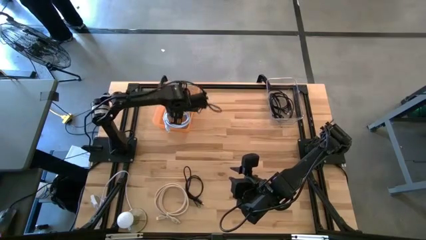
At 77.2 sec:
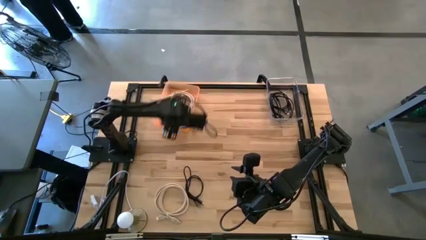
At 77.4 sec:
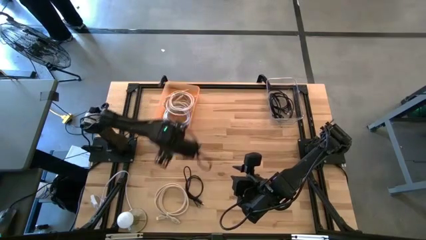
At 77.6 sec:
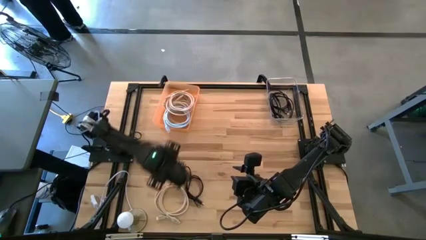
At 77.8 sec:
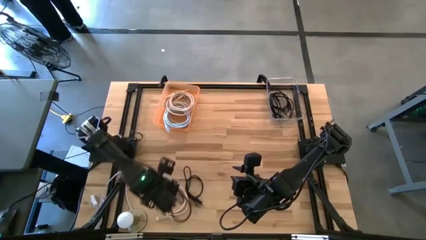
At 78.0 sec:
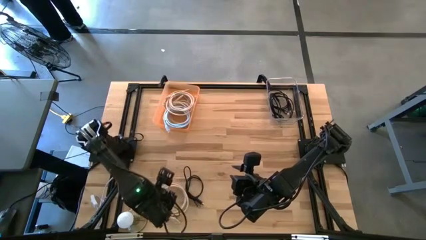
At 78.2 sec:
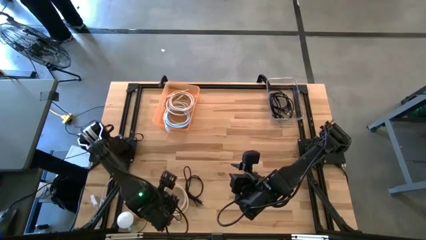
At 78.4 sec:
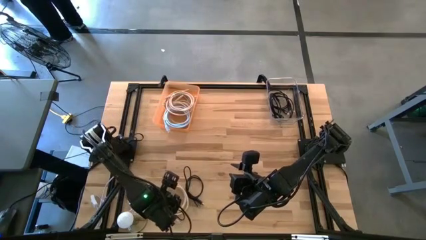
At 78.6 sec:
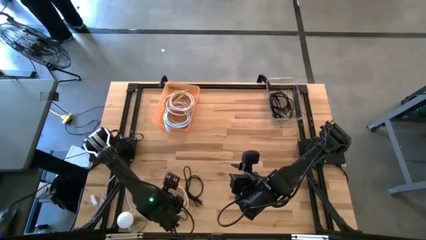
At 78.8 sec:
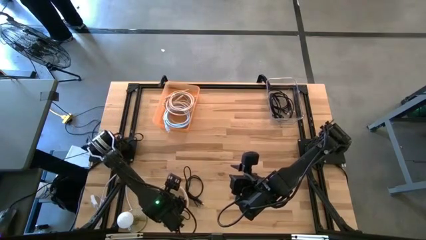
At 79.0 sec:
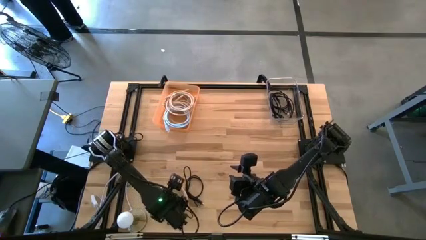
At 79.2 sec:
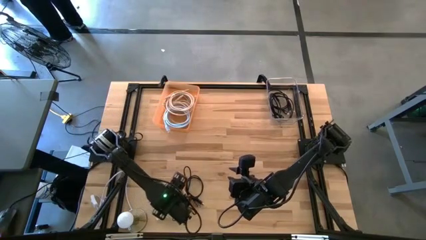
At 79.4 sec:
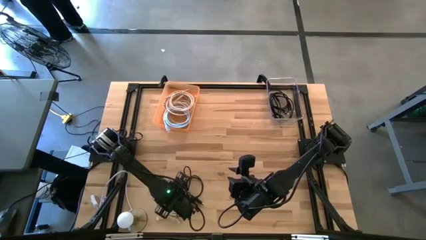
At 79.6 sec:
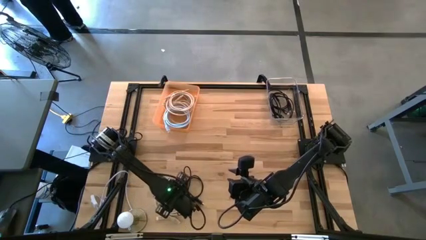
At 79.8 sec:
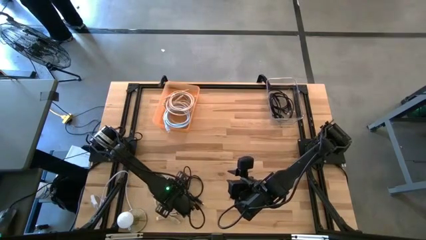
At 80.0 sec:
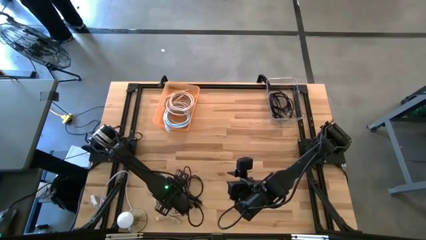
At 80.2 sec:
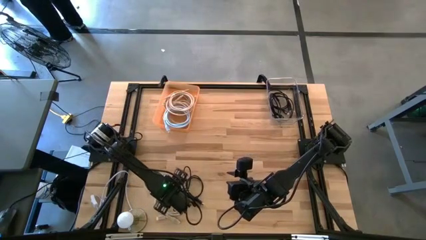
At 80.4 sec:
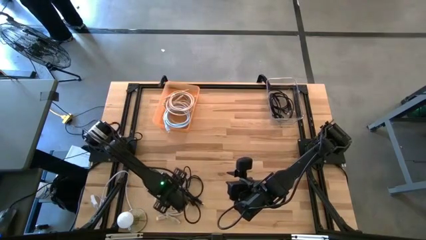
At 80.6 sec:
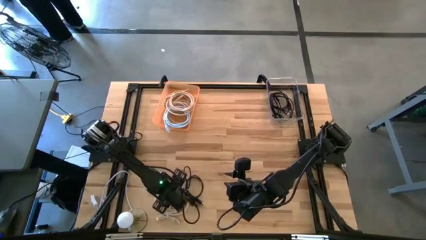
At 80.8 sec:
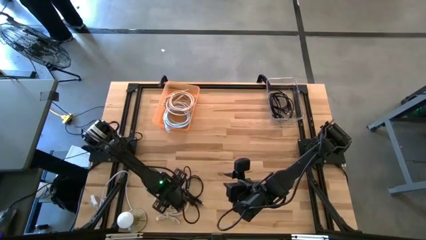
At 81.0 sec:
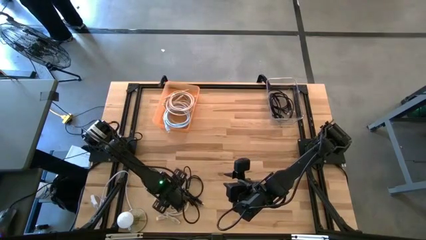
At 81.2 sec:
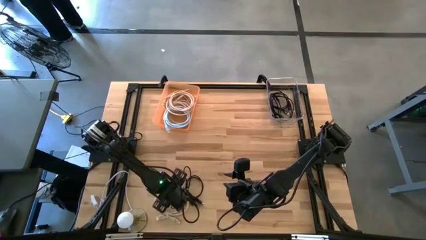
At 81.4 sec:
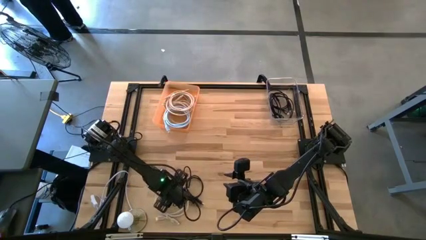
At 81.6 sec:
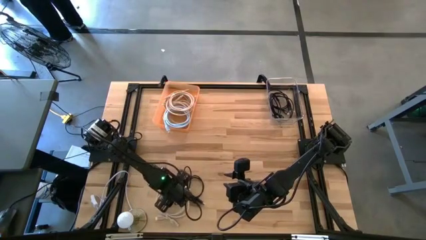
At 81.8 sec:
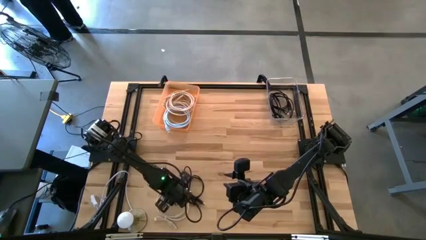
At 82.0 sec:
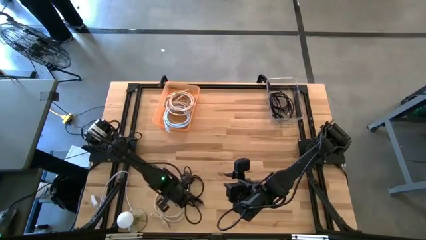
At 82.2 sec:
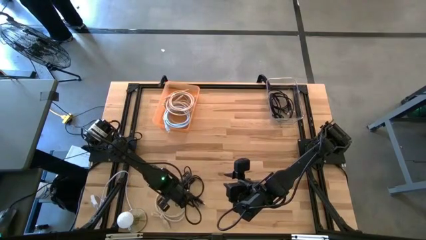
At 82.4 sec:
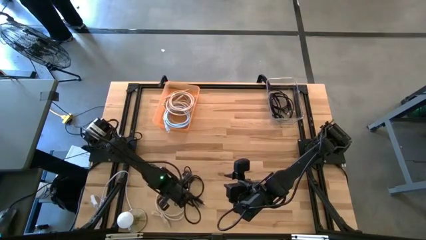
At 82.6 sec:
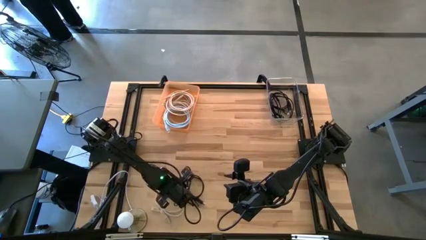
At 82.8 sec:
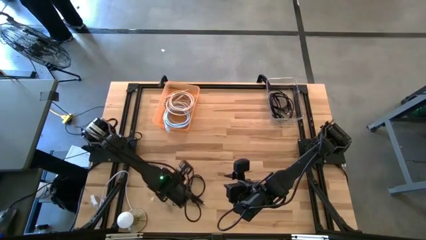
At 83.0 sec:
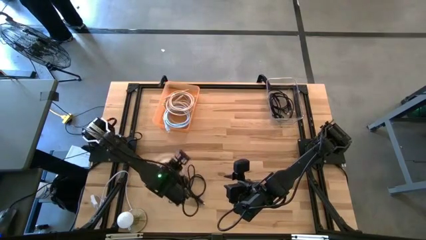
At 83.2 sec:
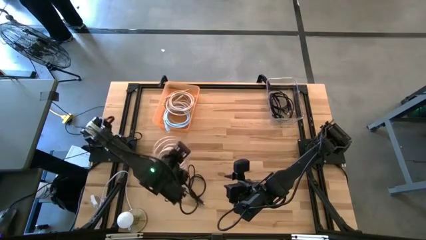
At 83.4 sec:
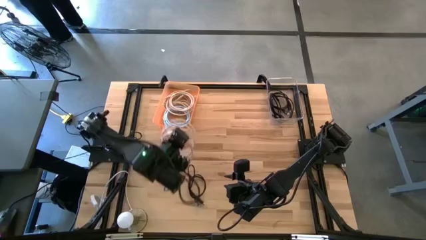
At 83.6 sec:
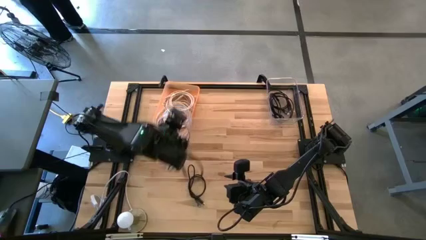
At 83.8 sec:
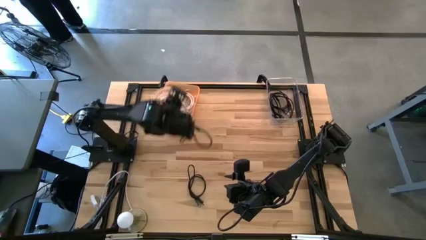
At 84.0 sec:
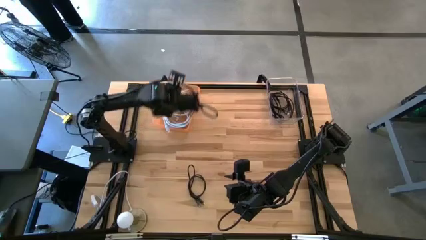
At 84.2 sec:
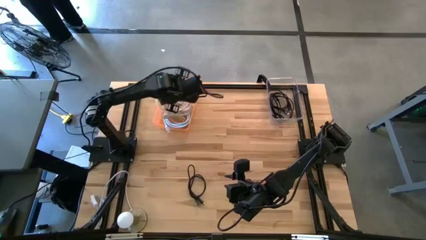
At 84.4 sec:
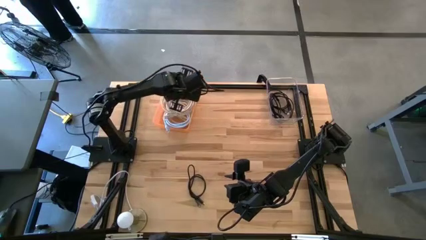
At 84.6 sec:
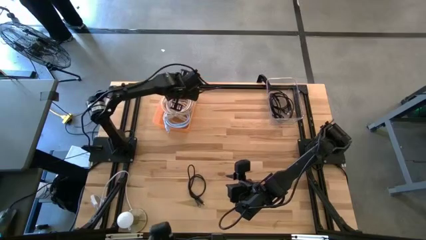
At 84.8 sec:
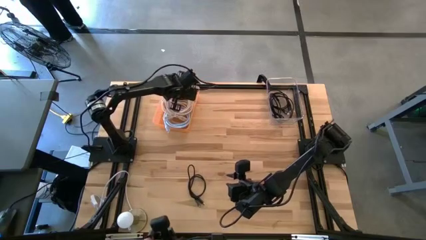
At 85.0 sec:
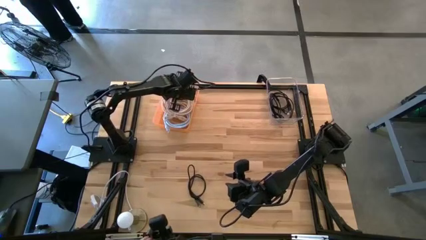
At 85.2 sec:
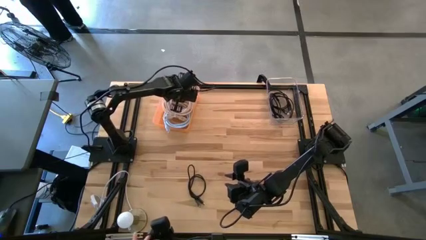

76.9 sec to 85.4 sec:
Task: Pick & Place USB Port
Put the light brown hdmi cable into the orange bin

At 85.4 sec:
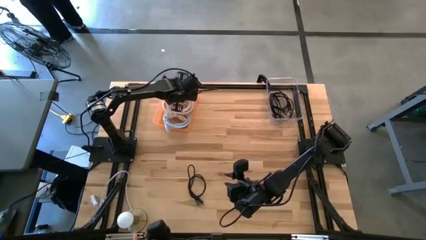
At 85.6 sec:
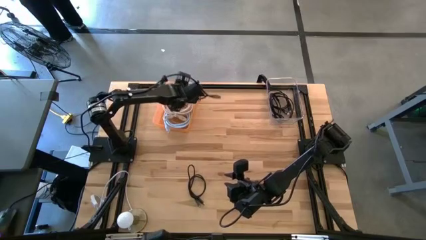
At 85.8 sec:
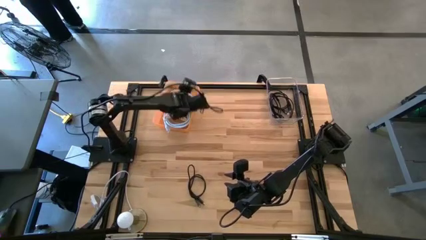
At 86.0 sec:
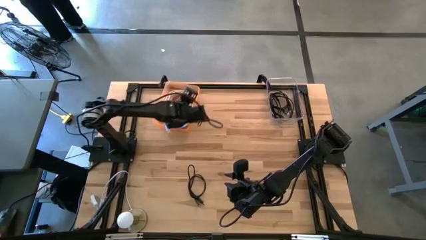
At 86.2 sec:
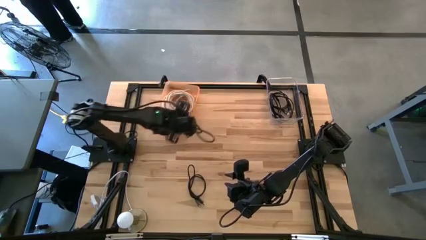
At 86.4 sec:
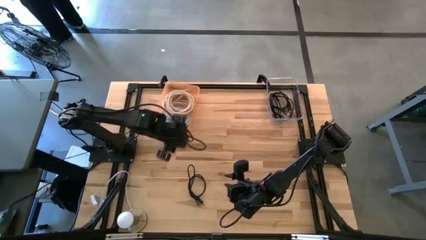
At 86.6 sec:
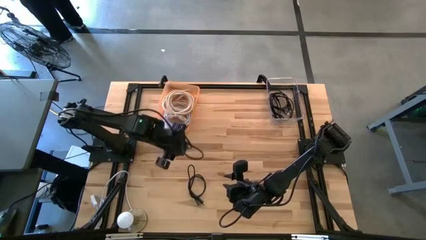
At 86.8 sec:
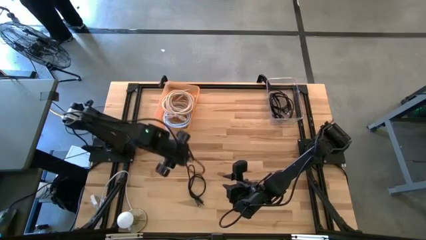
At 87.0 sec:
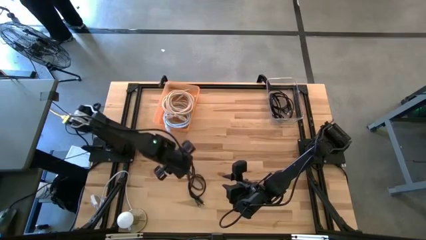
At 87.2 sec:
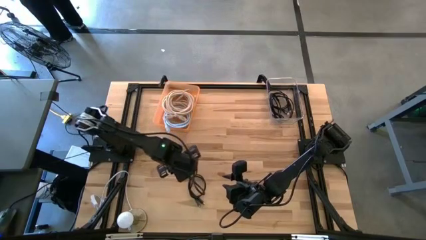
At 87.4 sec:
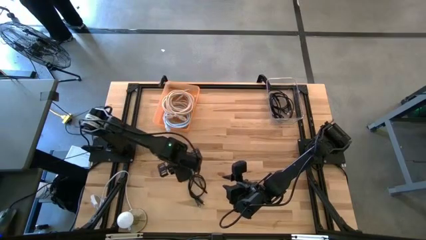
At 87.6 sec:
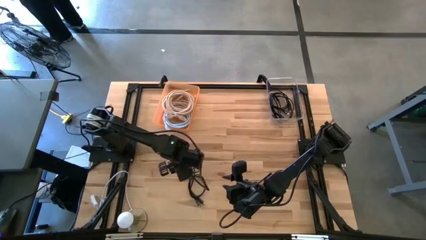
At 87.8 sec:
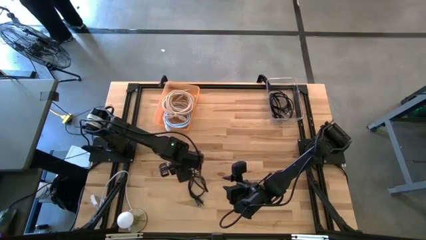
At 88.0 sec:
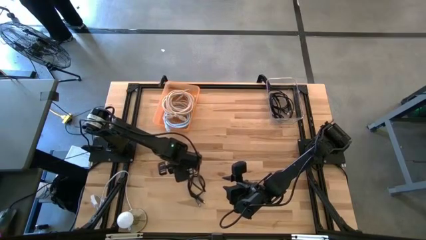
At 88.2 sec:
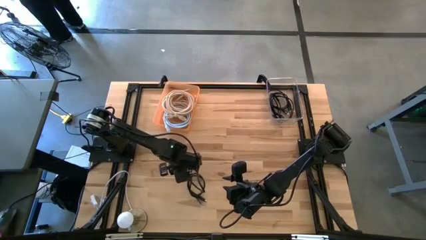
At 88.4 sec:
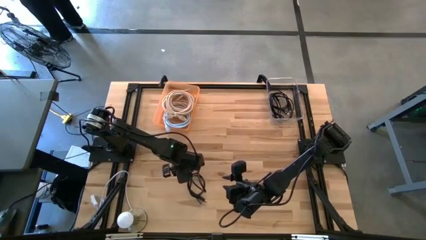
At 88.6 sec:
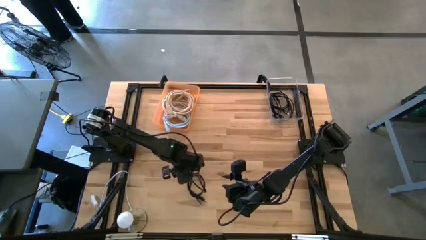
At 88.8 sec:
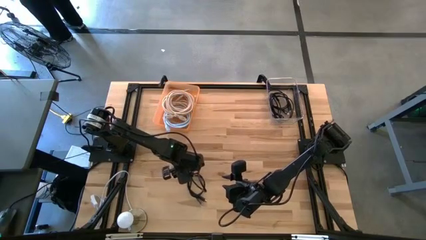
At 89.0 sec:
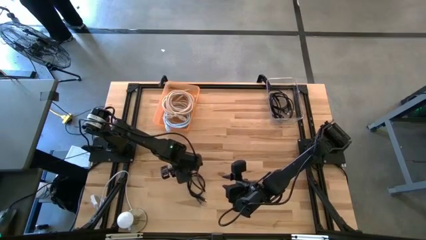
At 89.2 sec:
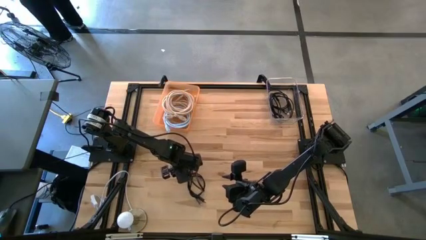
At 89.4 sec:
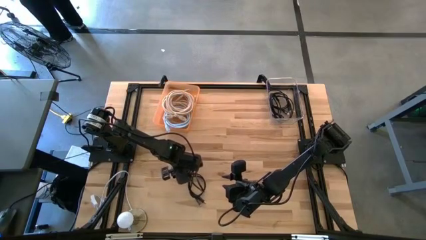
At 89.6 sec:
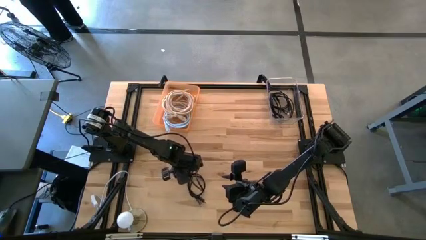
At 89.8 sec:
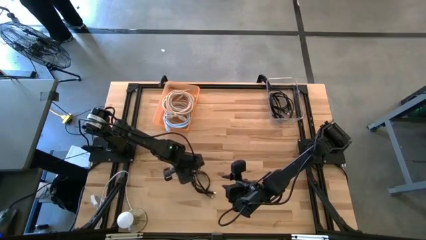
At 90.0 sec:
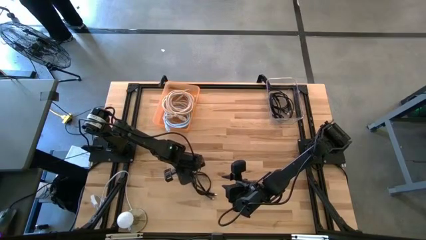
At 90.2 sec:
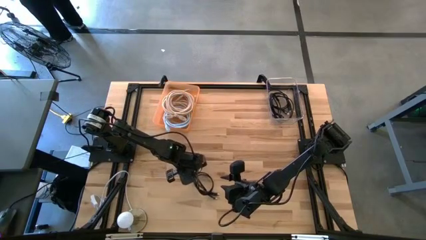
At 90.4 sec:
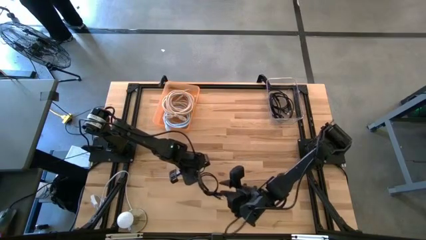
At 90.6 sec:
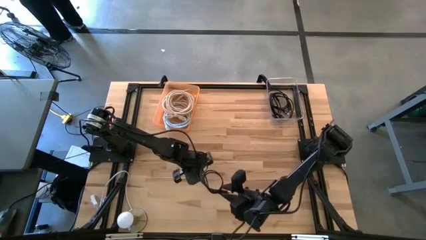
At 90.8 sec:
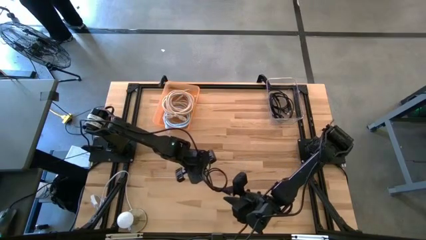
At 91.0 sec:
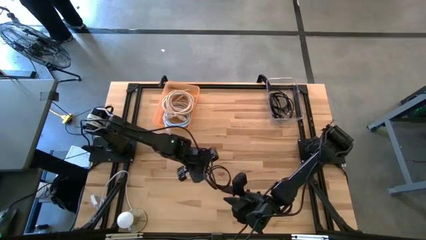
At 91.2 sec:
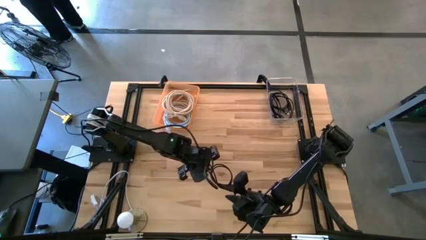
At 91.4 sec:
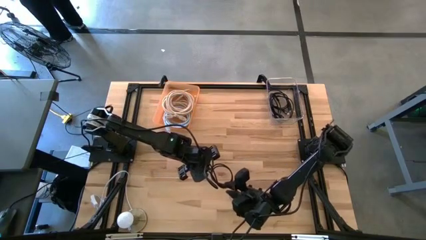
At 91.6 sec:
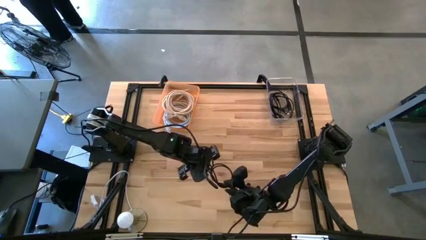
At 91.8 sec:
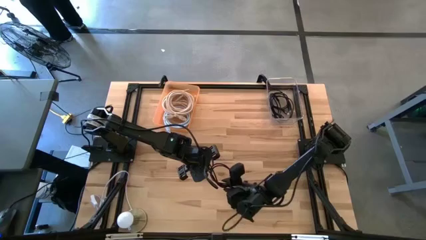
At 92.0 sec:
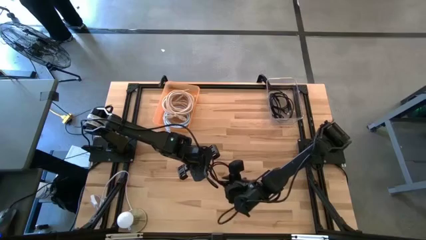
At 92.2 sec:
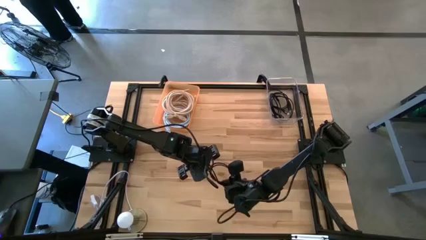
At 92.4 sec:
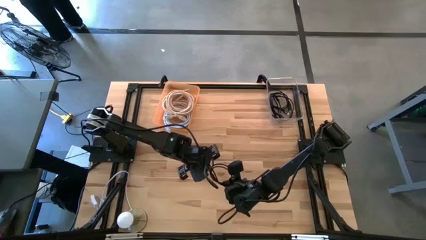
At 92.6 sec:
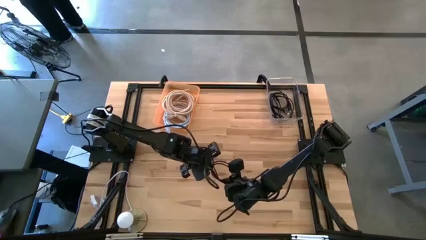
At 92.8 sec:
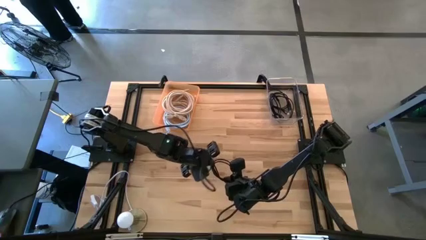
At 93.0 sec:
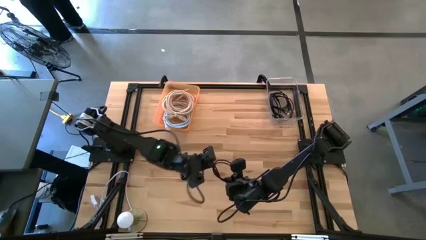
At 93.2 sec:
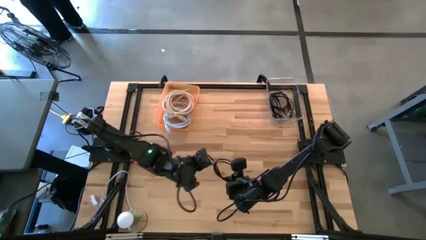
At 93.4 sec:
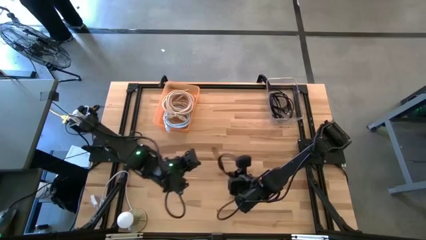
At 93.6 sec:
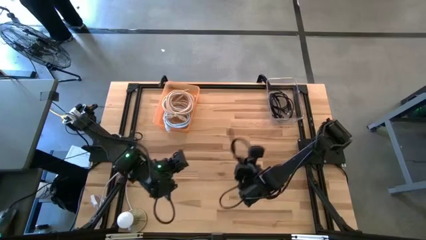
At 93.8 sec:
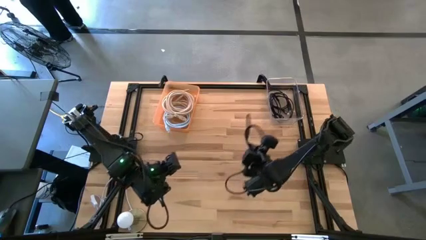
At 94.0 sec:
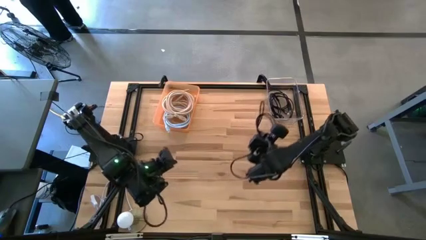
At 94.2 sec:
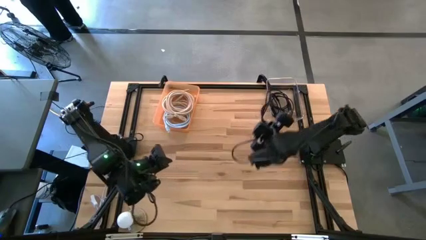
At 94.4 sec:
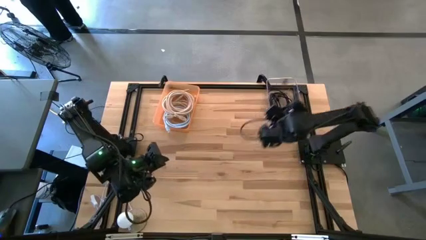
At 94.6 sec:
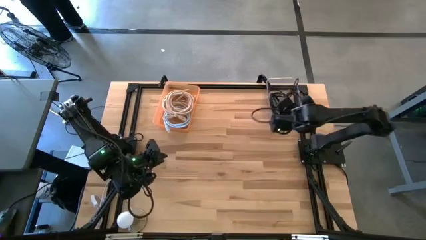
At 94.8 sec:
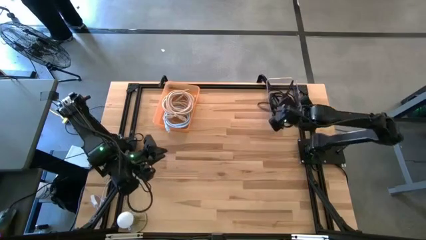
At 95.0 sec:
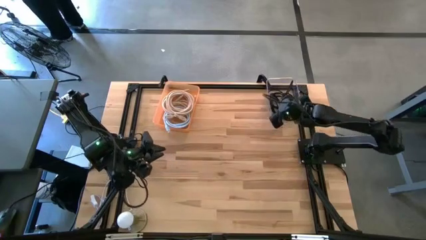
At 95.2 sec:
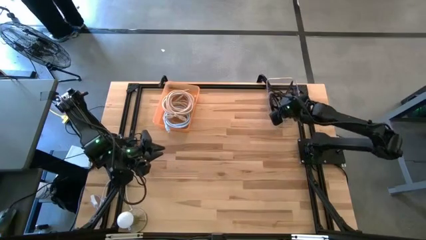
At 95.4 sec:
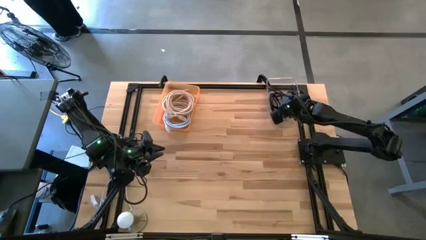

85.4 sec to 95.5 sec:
Put the black charger cable into the transparent bin
